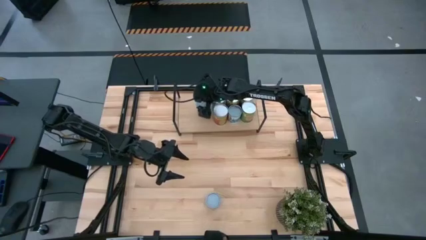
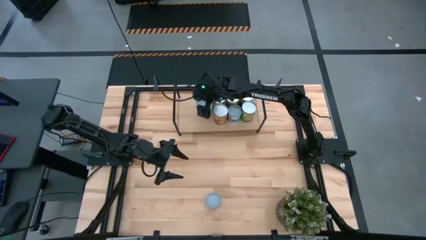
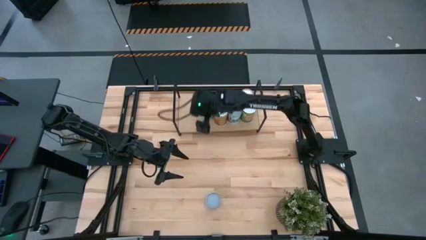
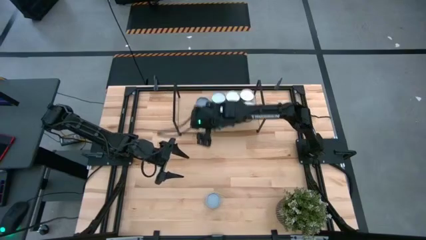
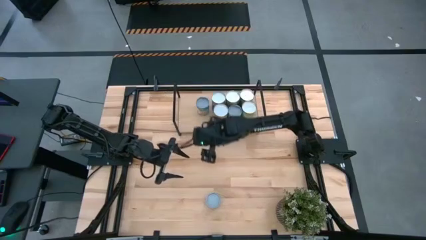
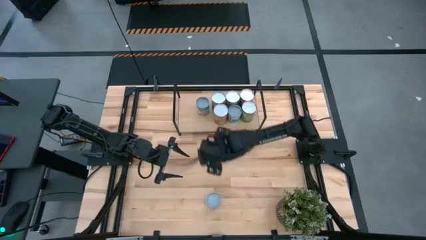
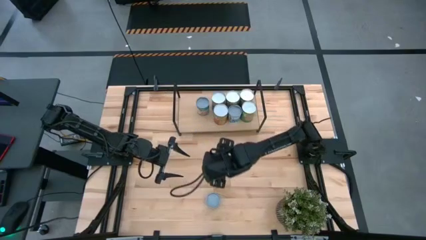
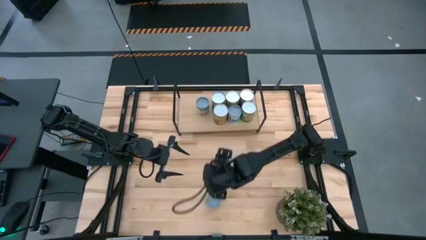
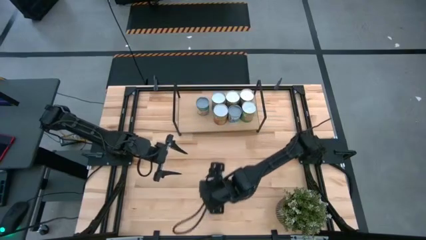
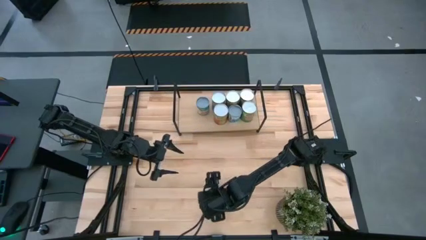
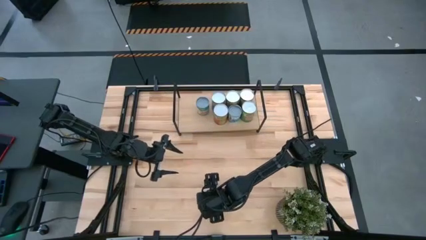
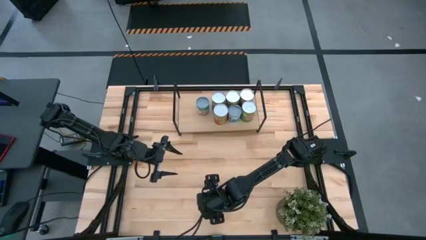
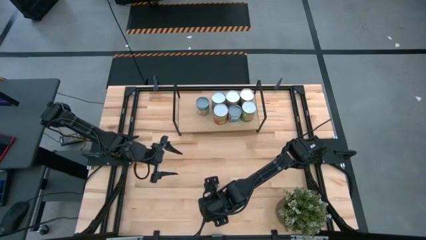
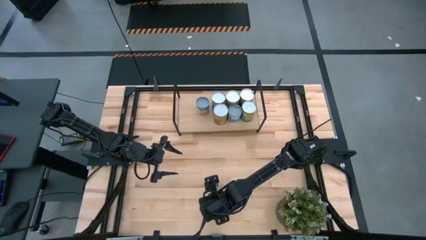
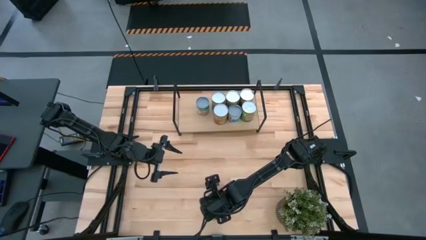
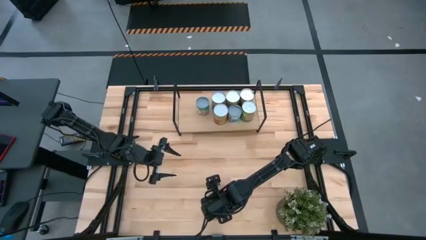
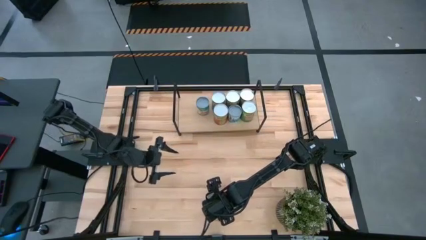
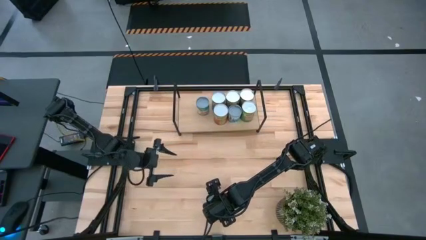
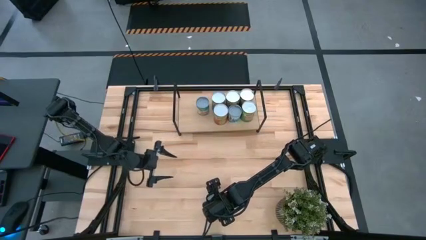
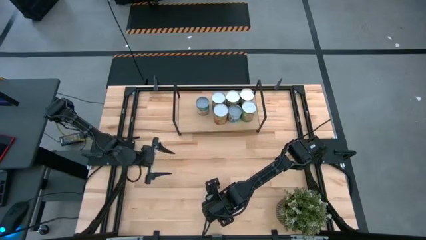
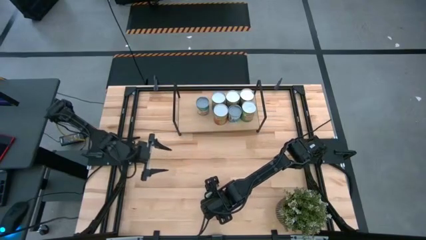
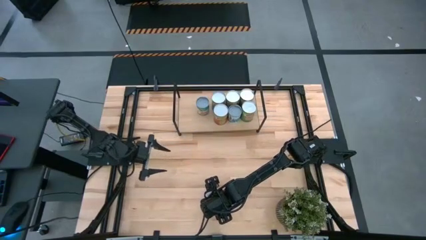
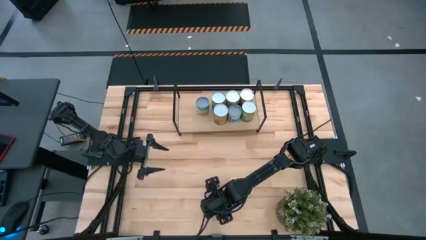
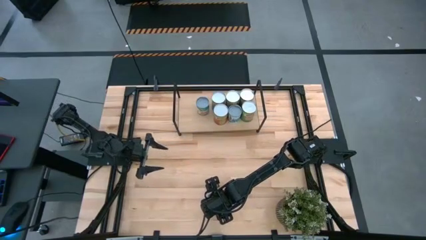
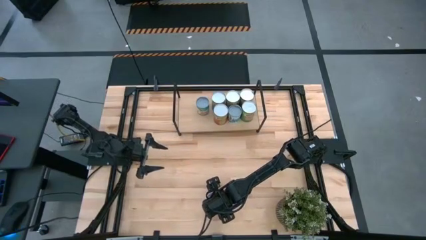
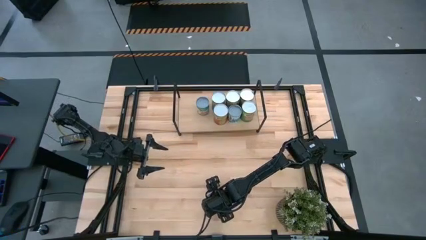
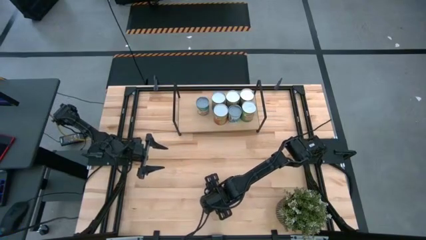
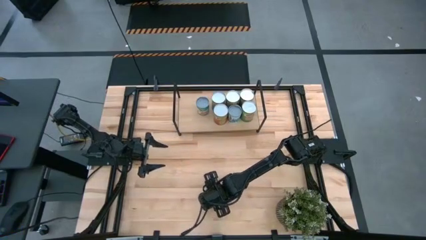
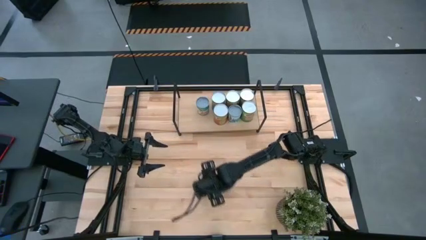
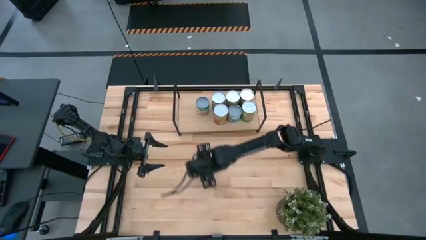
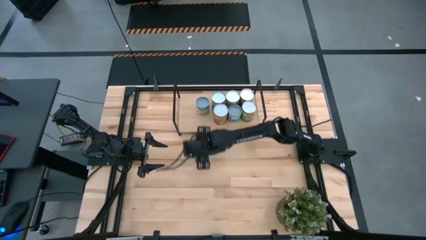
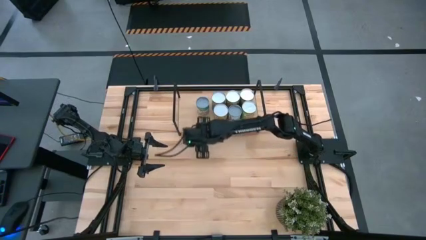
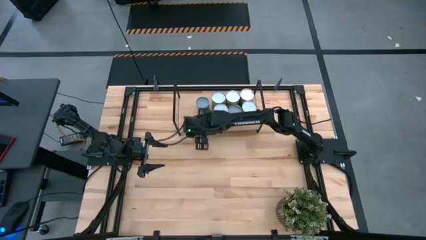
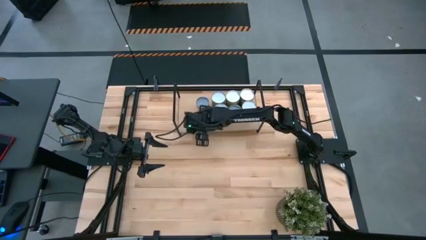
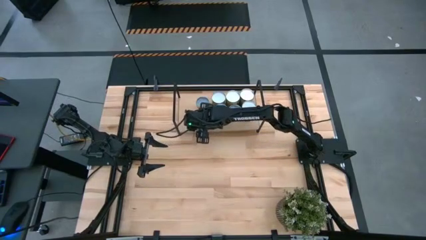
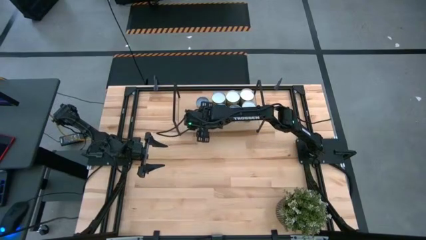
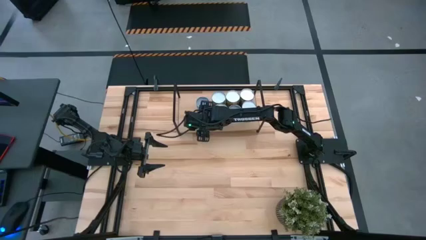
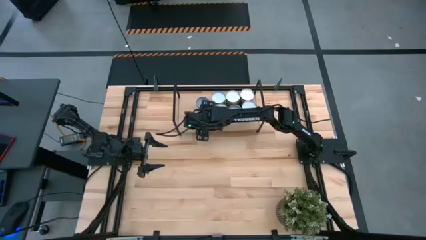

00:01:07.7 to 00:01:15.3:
Task: Pick and place cans onto a shelf
Put the canned tuna on the shelf

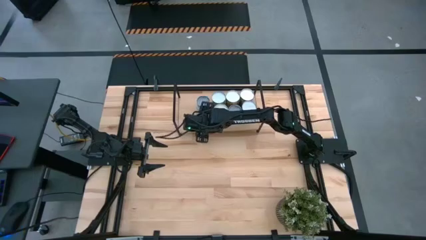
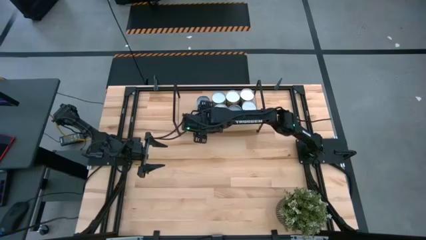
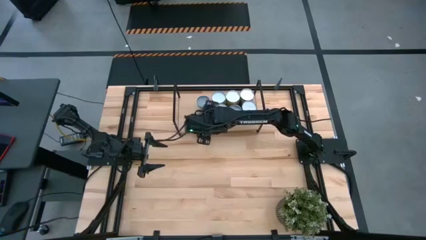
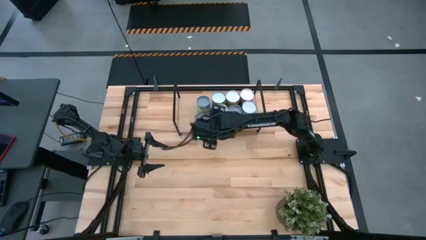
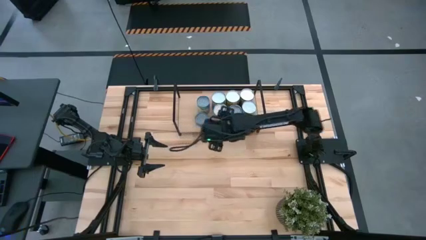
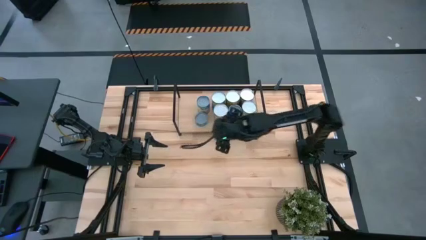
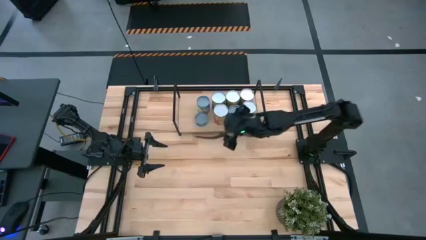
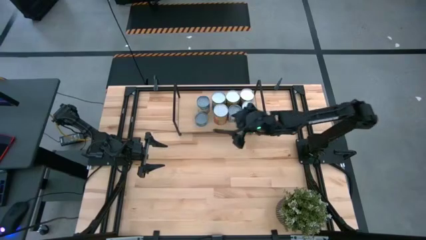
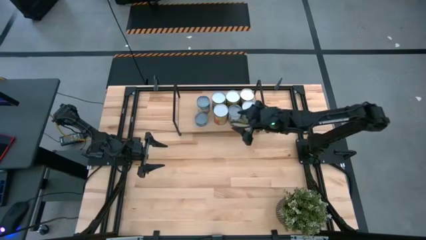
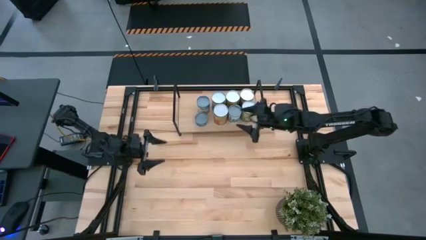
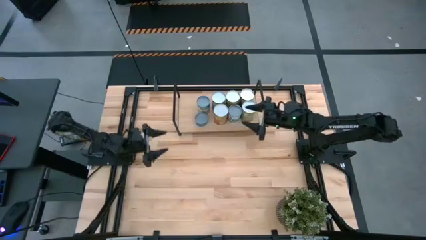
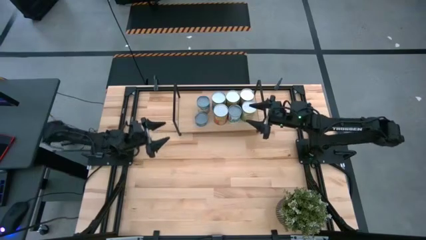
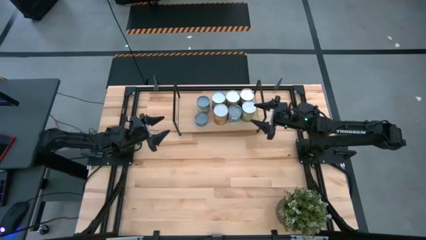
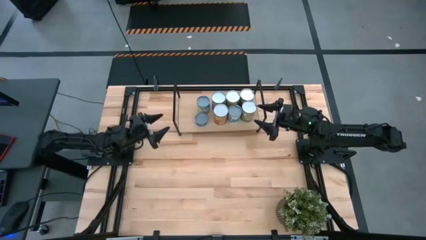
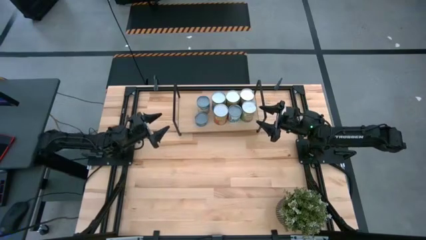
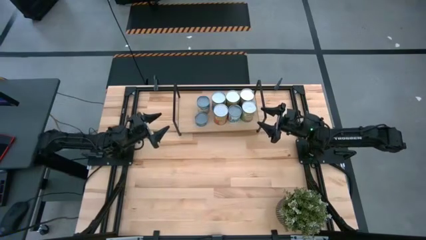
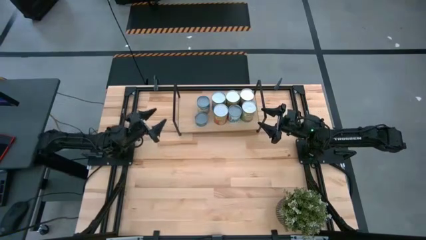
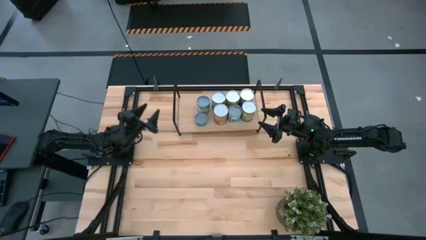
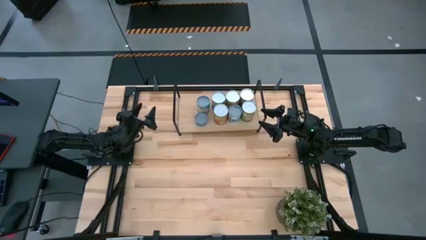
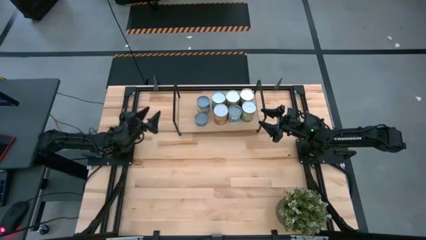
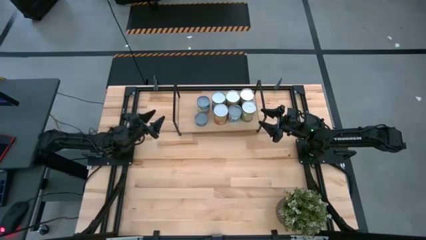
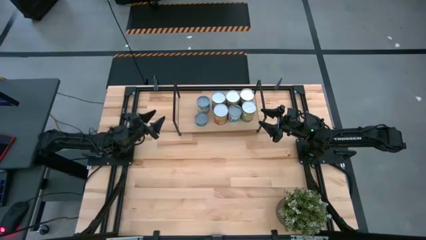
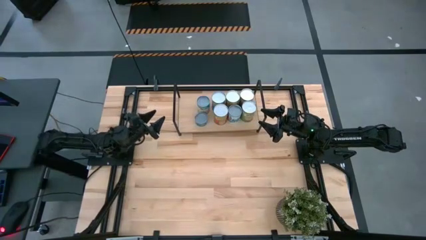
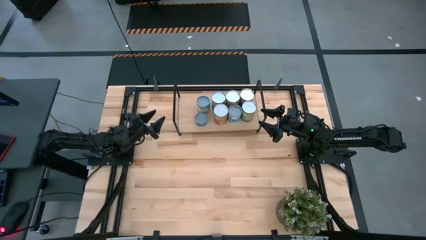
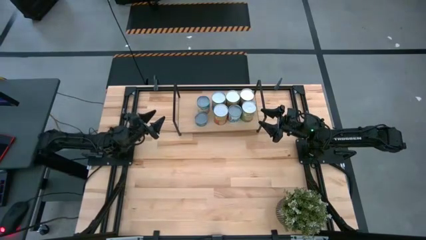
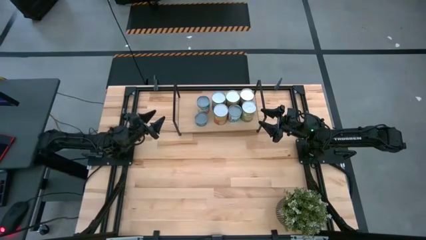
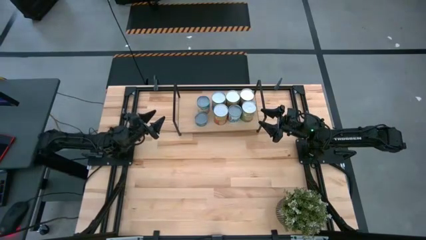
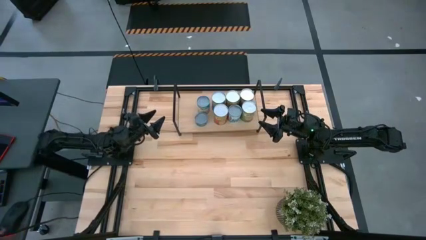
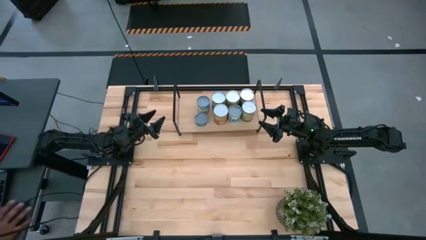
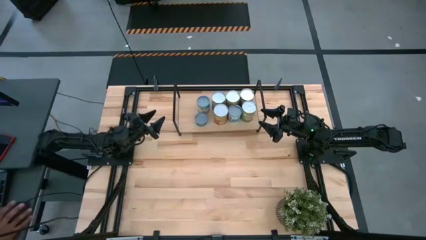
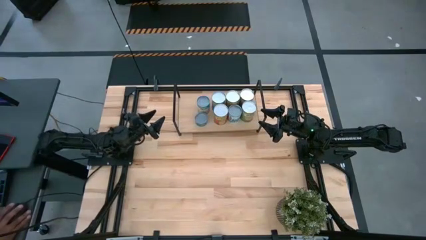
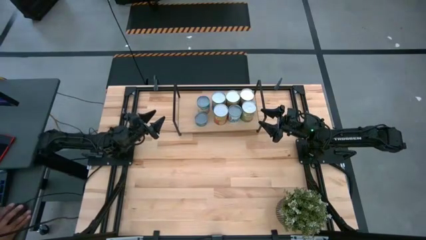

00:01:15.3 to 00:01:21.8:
Return to Home Position

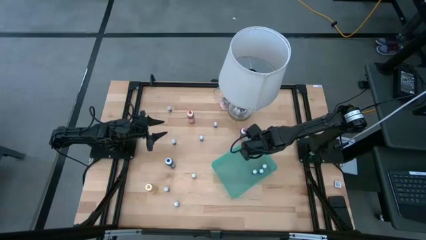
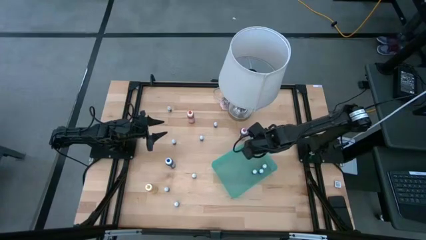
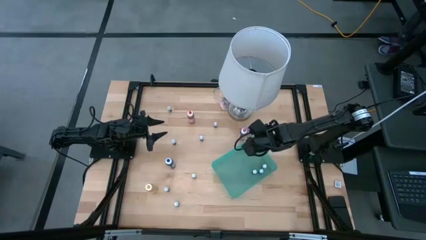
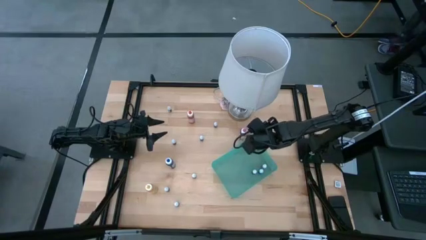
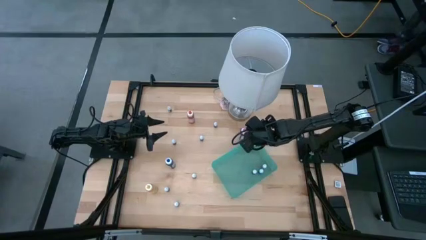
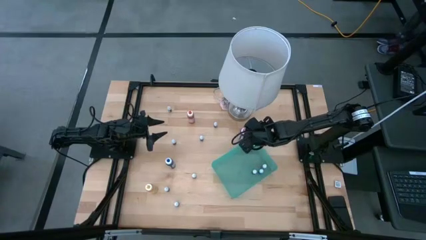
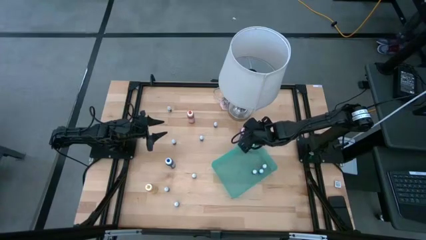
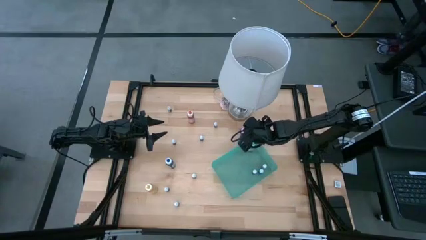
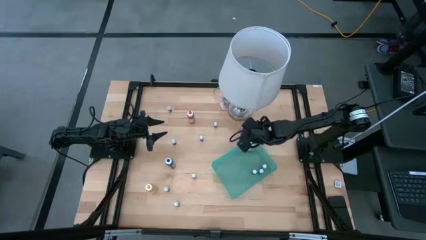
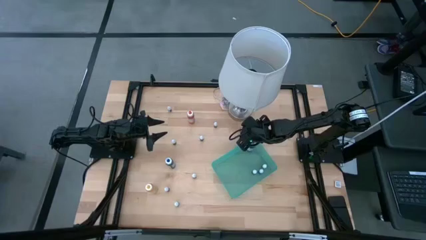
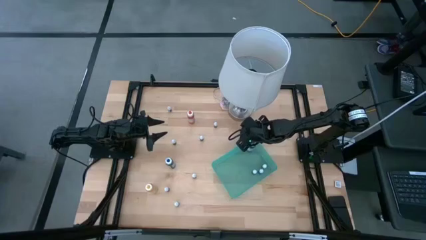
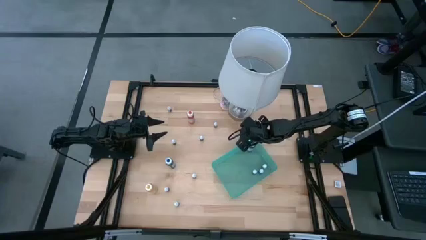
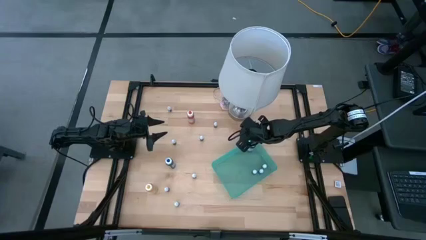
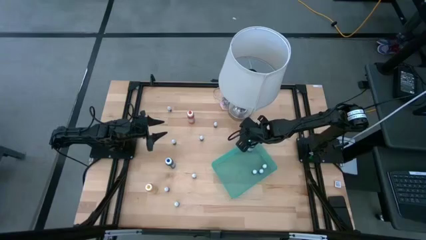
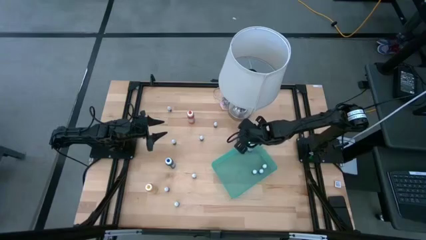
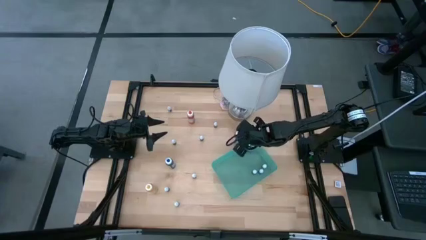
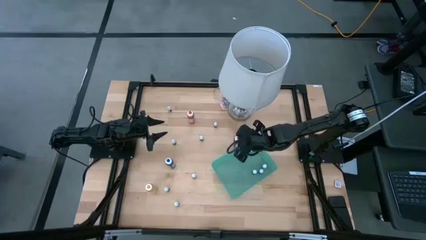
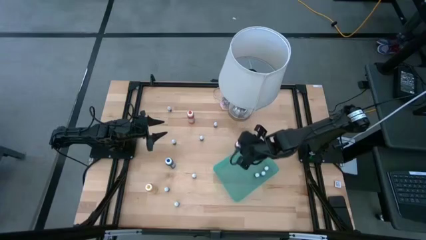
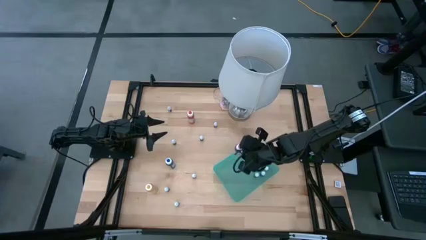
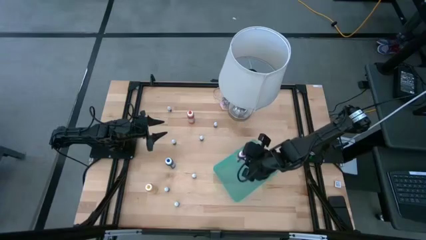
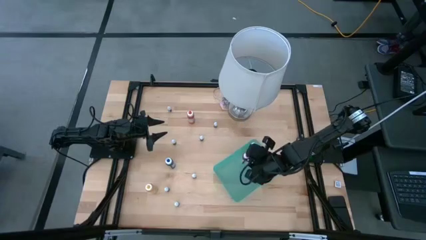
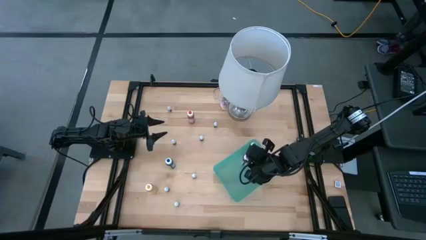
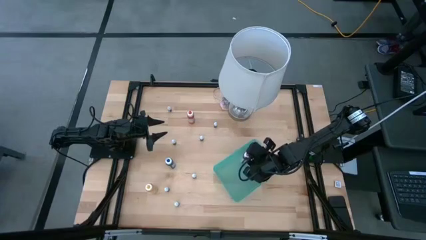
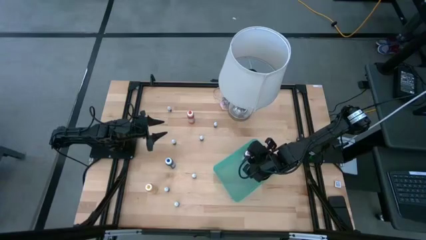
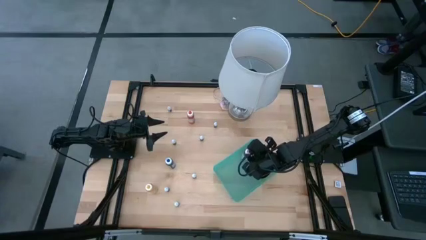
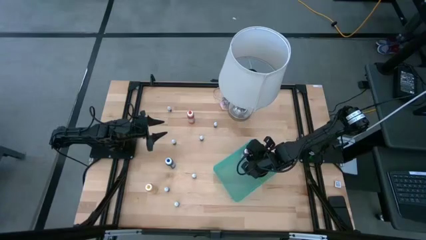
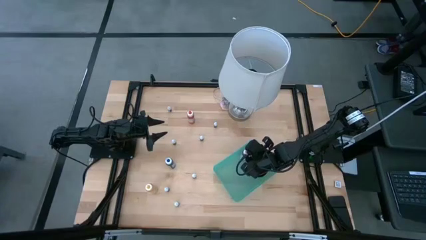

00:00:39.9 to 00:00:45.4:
Task: Pick & Place food coloring
Put the large pink food coloring bottle into the gray bin
